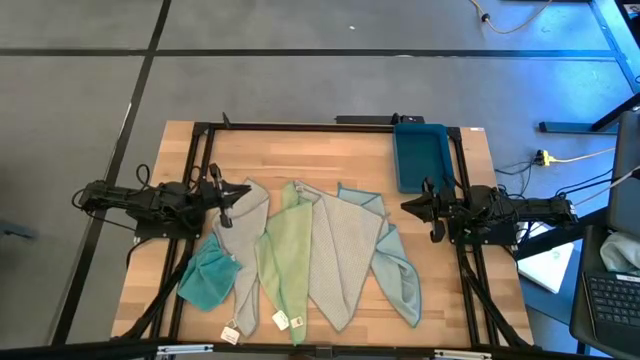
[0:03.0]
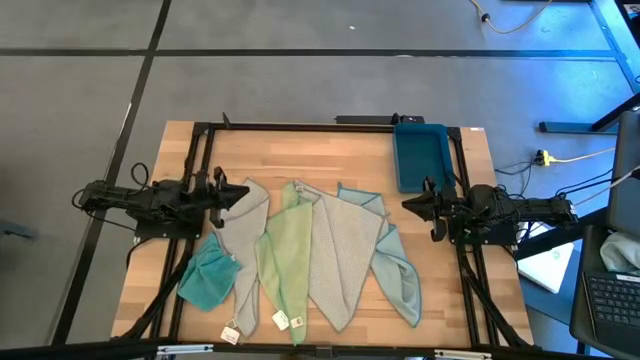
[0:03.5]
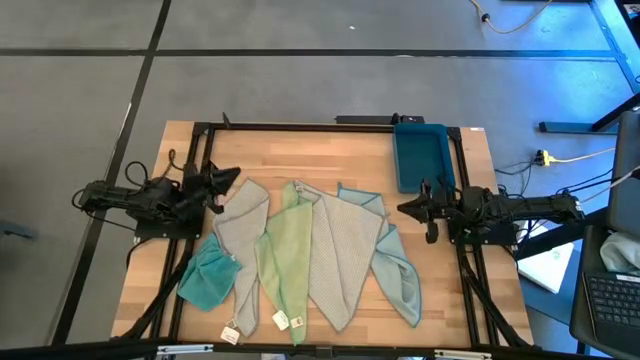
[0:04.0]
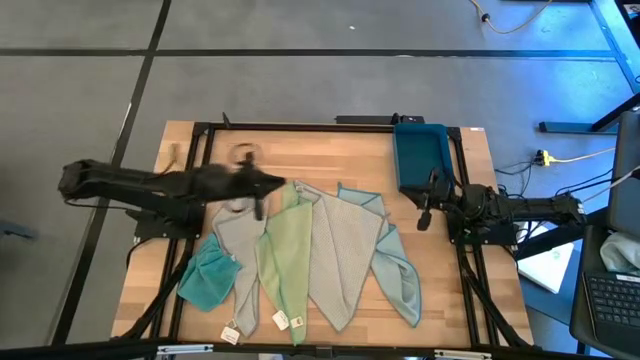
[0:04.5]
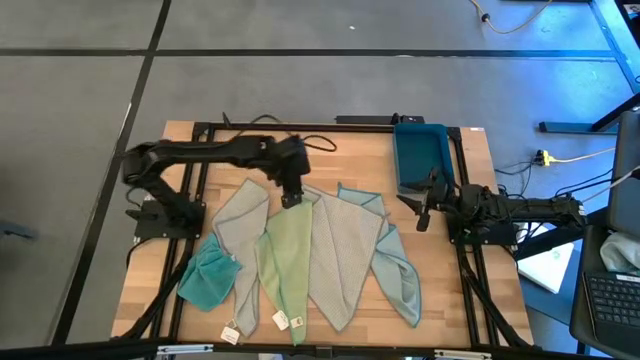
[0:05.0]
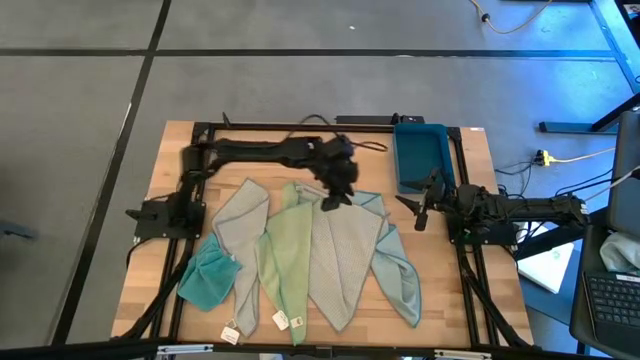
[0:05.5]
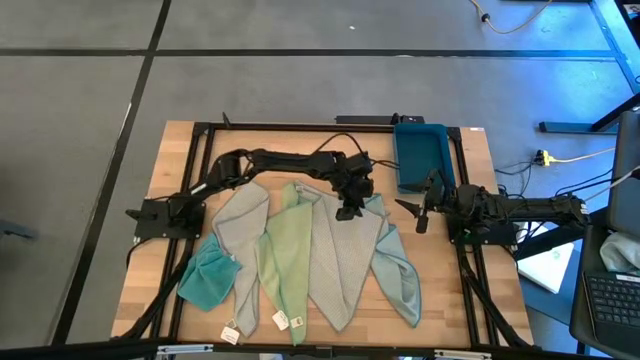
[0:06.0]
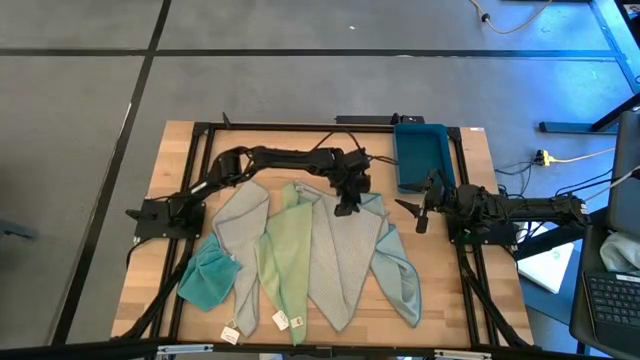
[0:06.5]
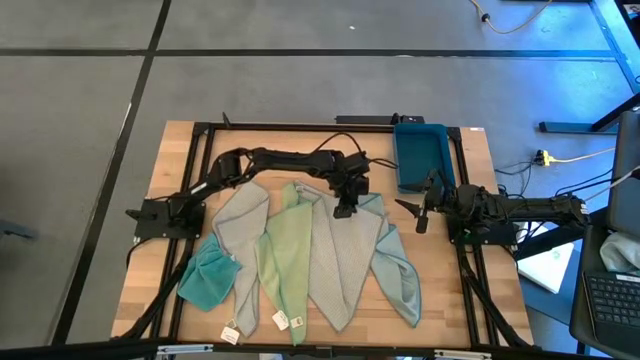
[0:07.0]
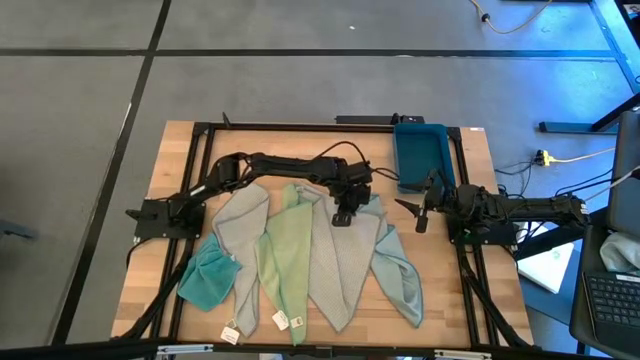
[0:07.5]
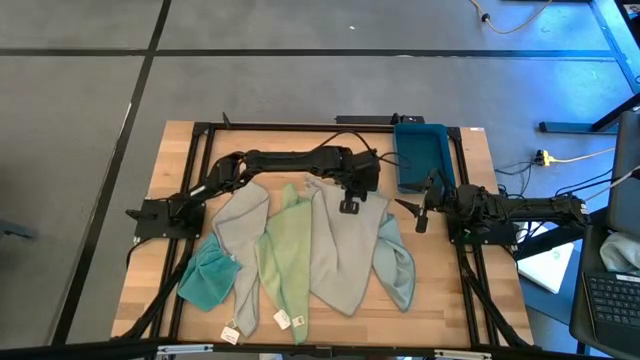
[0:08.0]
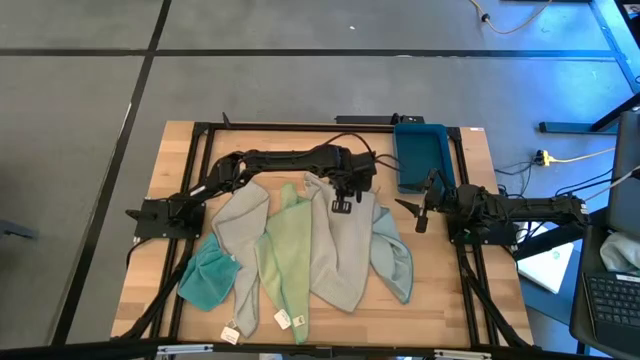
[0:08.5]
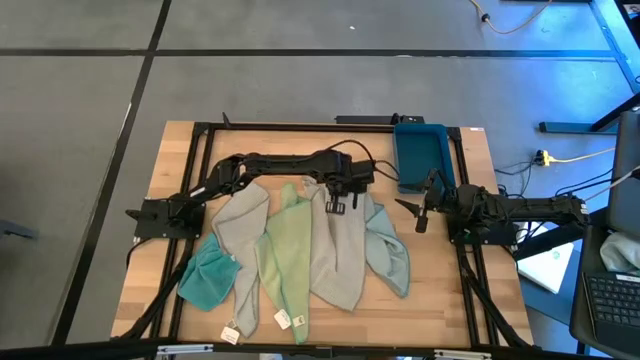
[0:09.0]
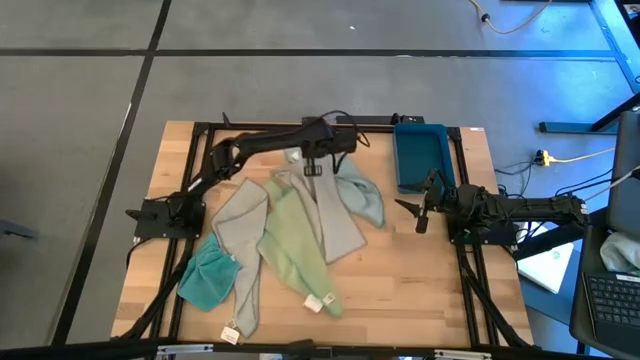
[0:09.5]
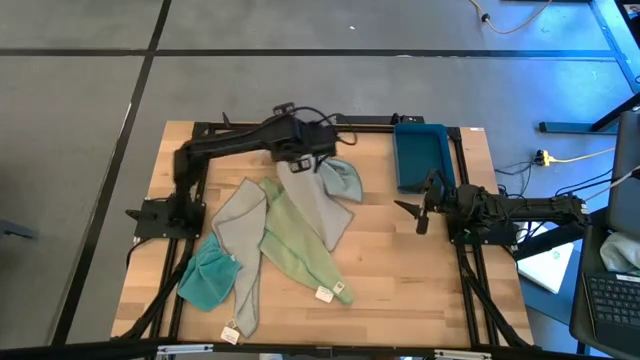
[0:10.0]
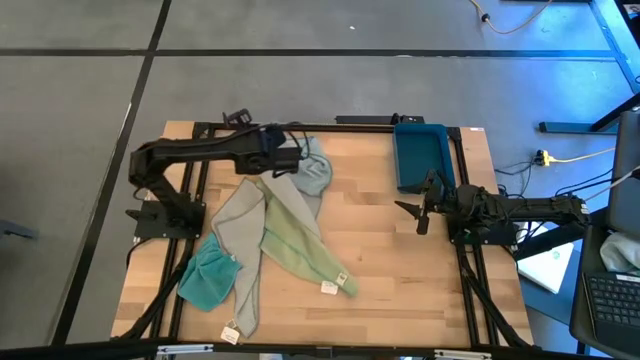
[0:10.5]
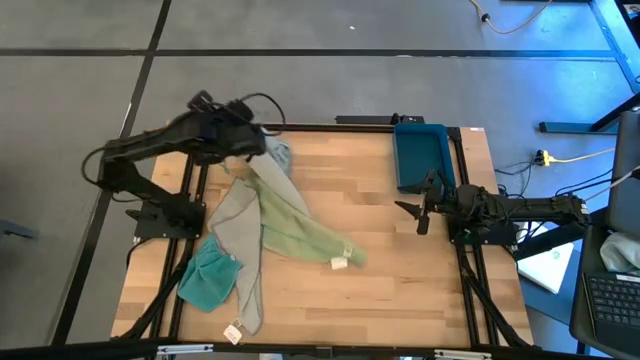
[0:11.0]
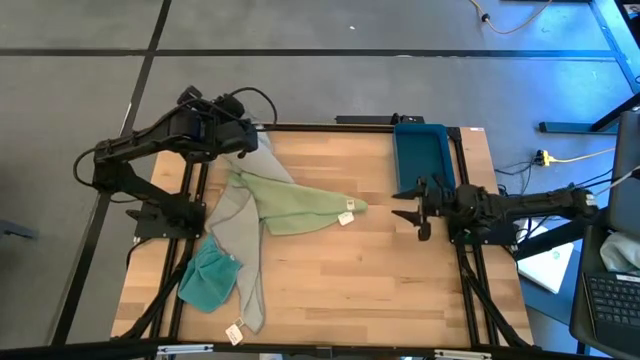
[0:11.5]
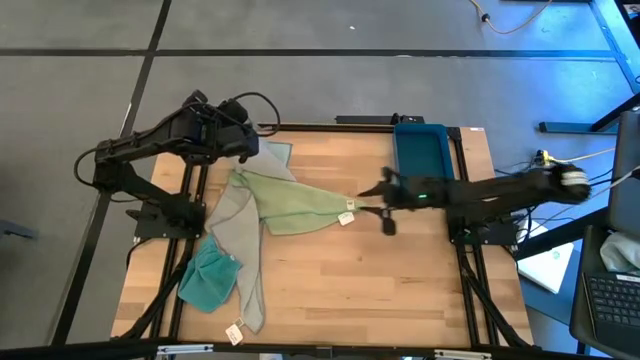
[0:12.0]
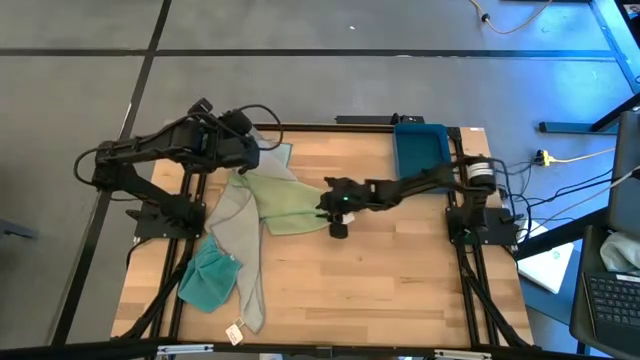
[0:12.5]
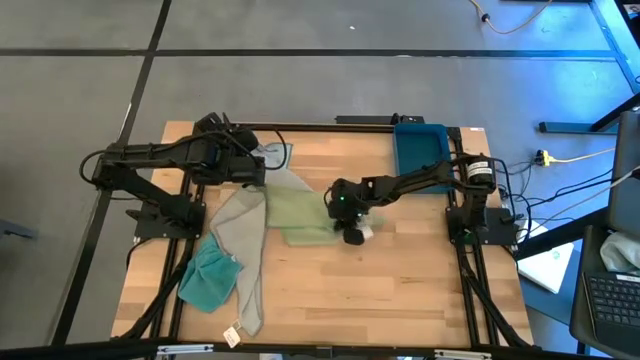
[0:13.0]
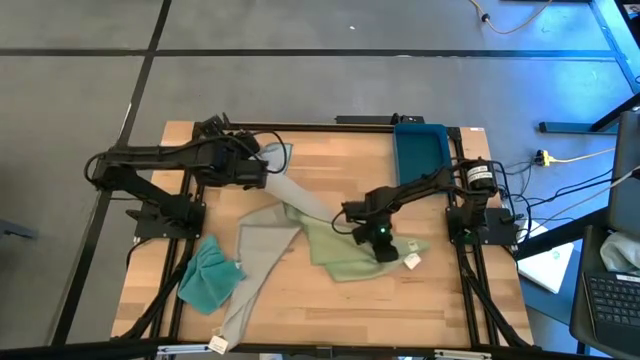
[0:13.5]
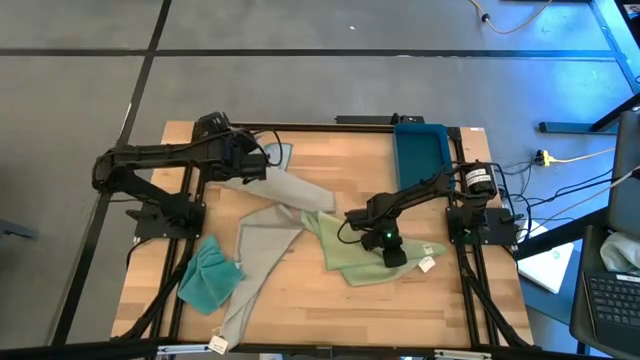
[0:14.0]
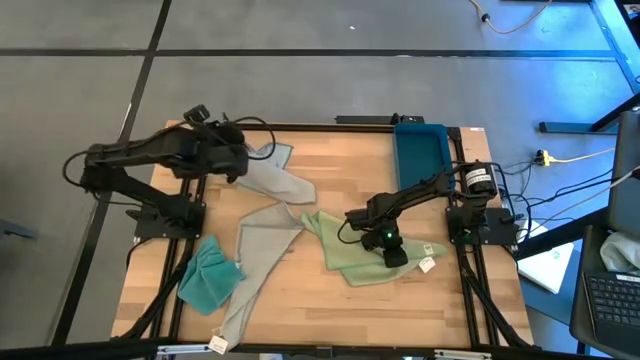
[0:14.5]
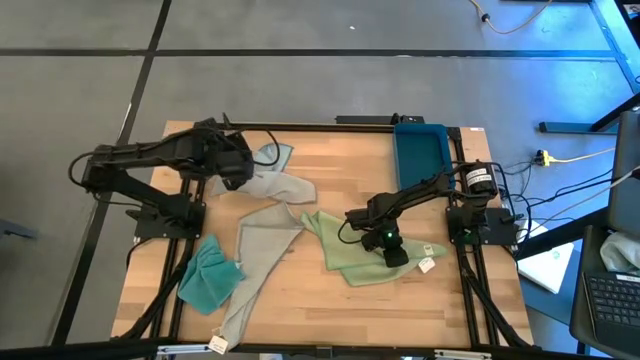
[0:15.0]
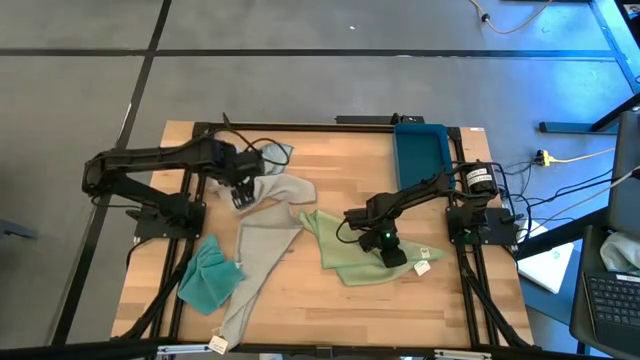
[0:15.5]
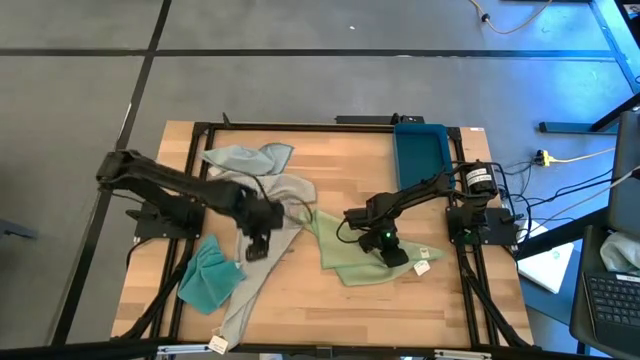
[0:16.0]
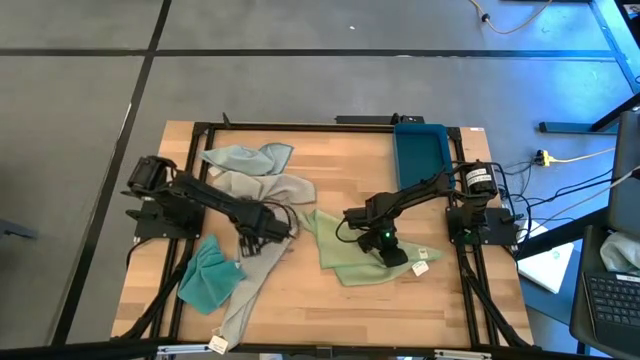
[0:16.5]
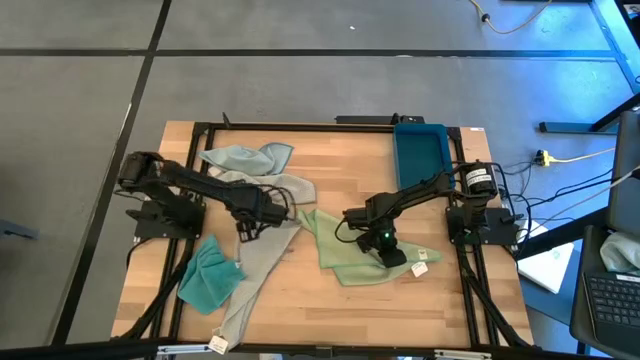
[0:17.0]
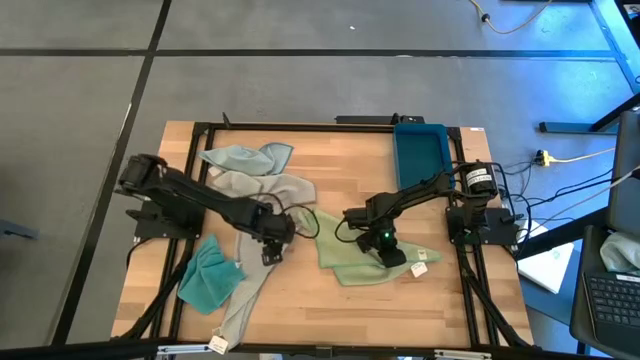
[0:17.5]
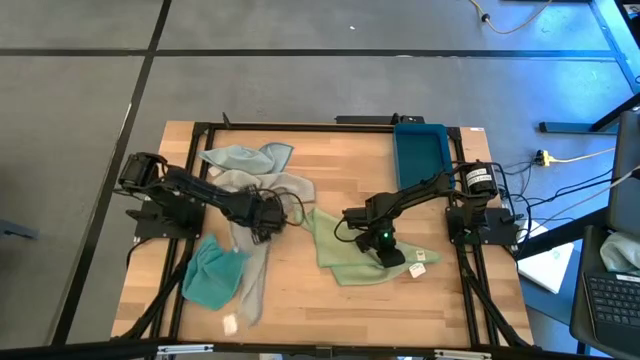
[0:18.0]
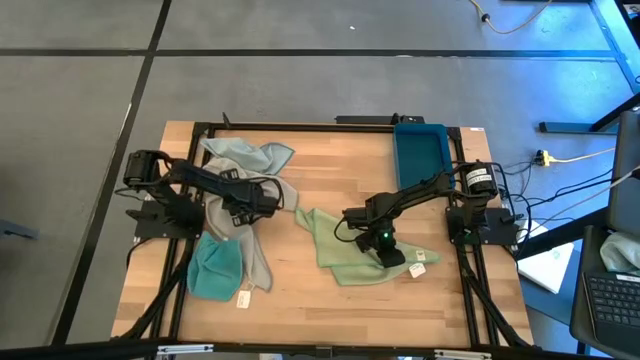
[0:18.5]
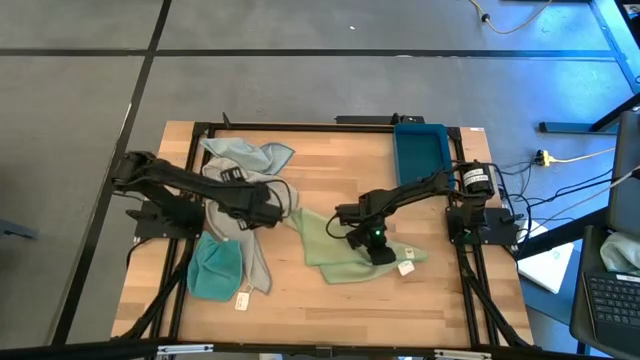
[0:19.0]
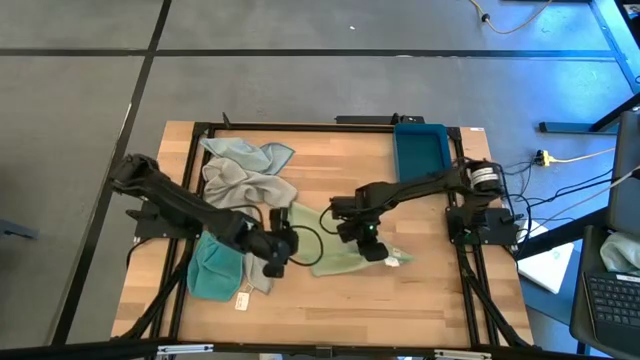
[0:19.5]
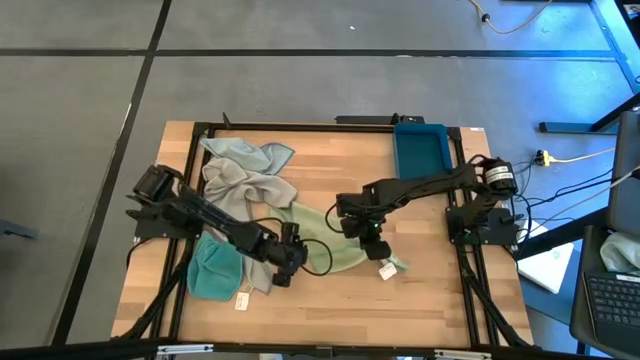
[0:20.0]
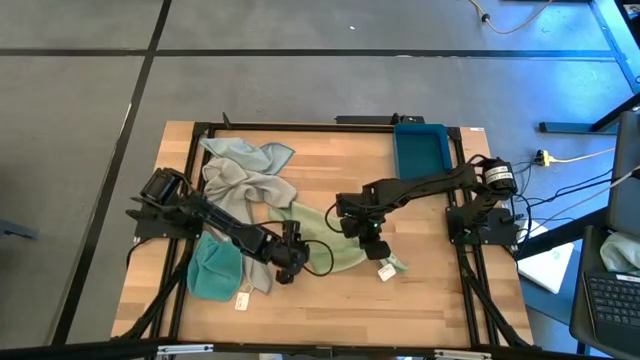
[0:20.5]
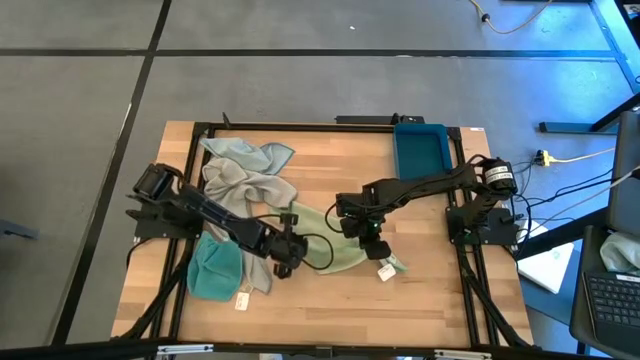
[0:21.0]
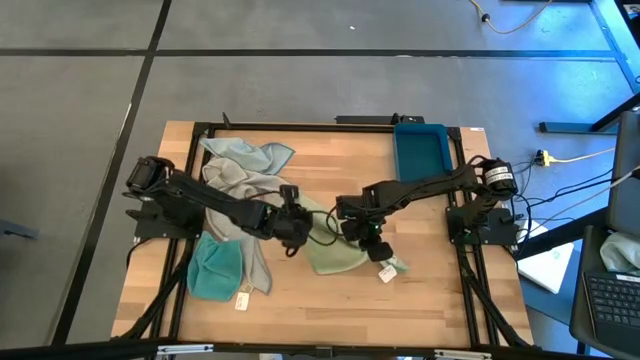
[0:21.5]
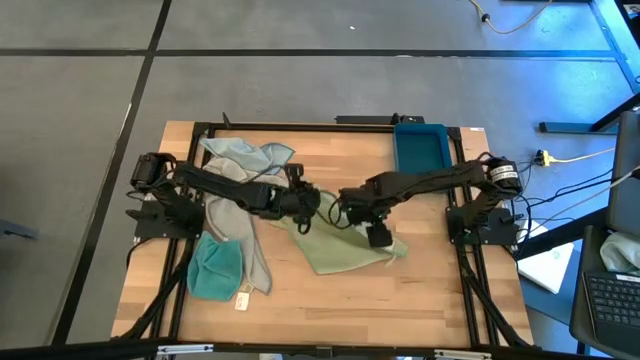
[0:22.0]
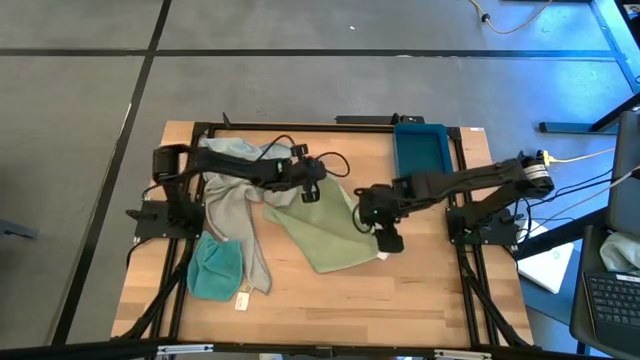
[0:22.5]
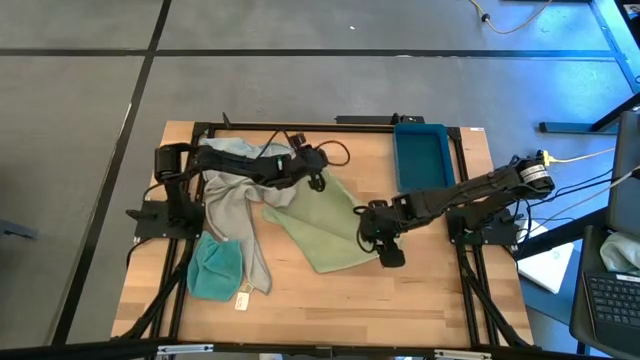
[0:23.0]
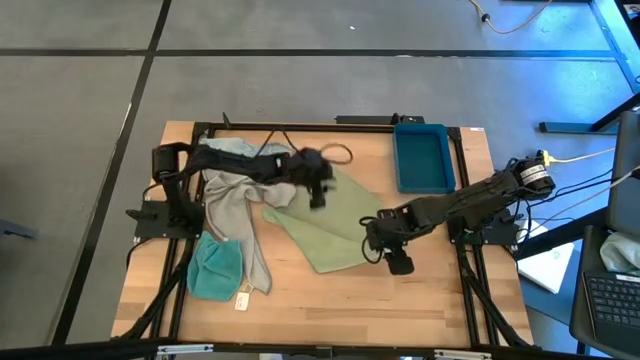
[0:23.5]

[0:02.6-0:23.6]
Task: Fold microfiber towels
Fold the green microfiber cloth
